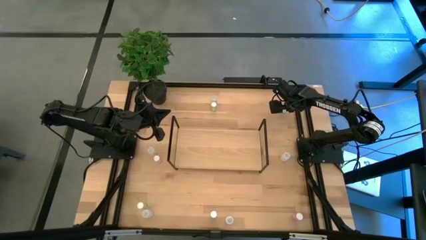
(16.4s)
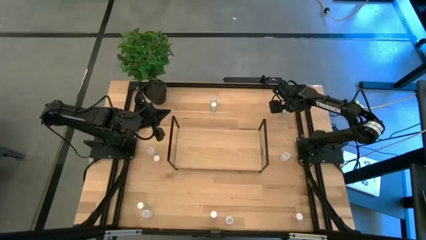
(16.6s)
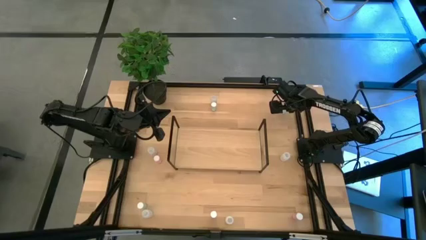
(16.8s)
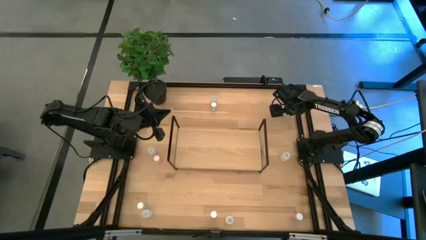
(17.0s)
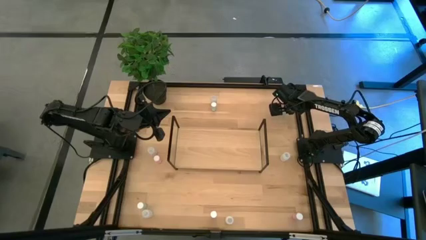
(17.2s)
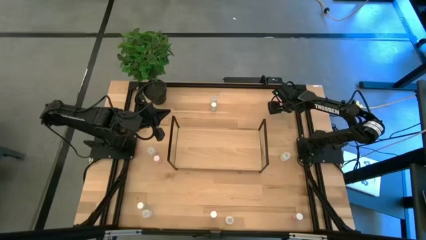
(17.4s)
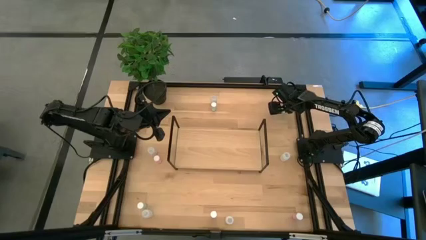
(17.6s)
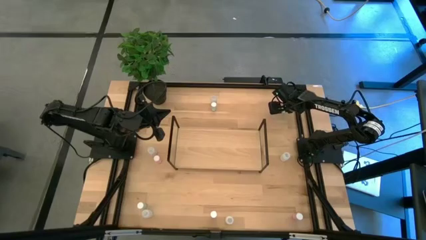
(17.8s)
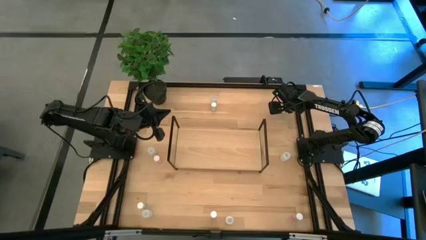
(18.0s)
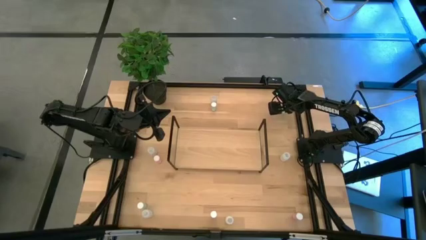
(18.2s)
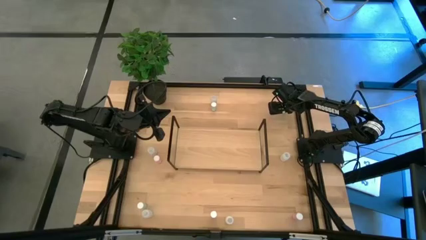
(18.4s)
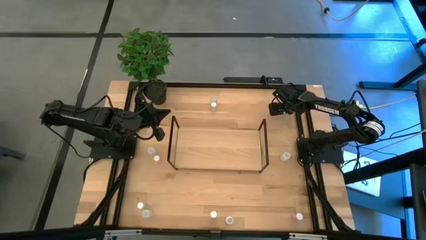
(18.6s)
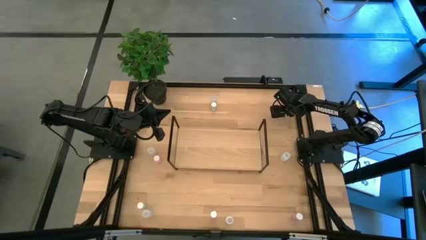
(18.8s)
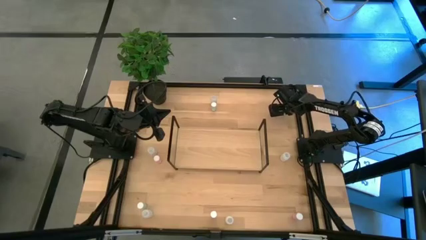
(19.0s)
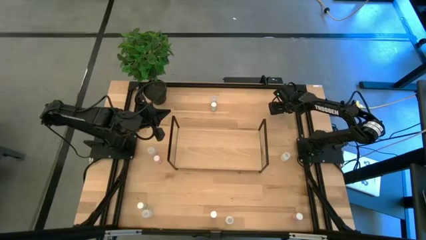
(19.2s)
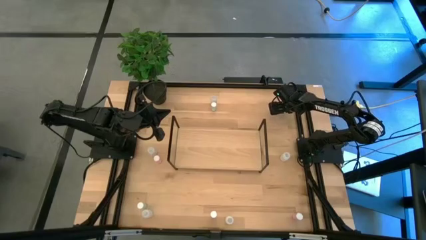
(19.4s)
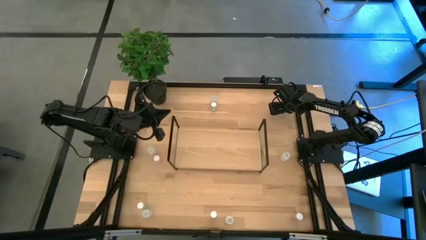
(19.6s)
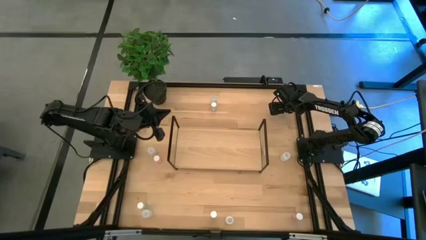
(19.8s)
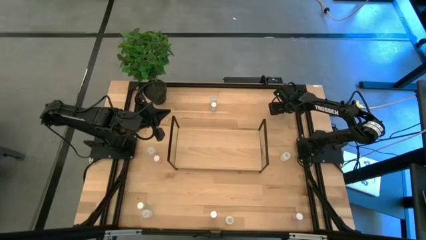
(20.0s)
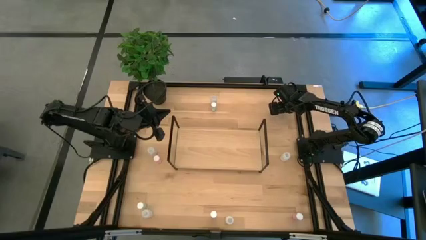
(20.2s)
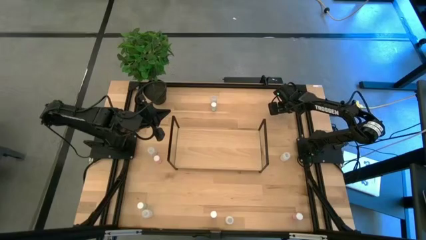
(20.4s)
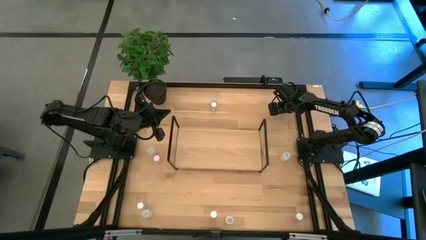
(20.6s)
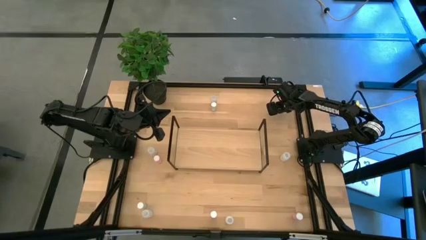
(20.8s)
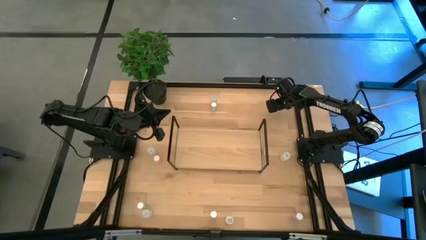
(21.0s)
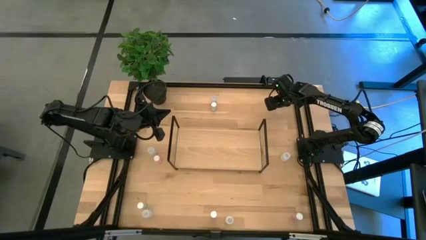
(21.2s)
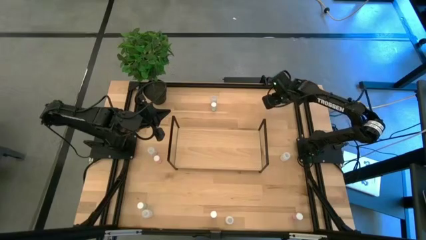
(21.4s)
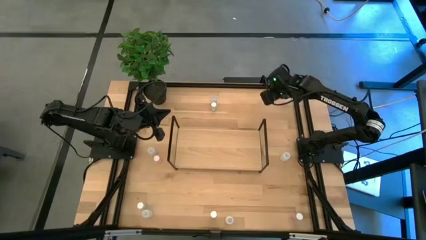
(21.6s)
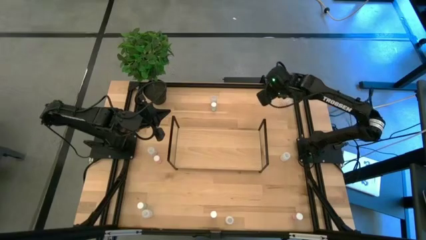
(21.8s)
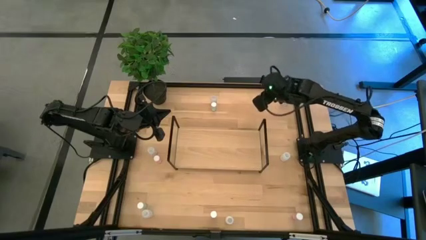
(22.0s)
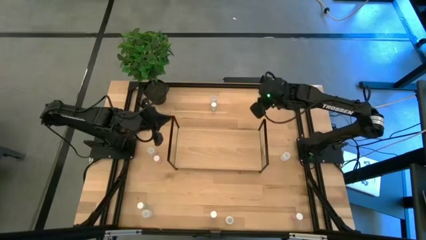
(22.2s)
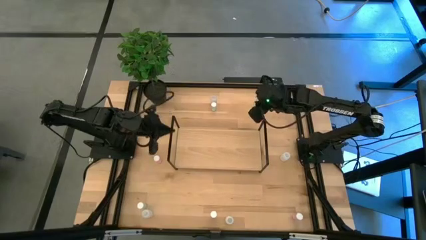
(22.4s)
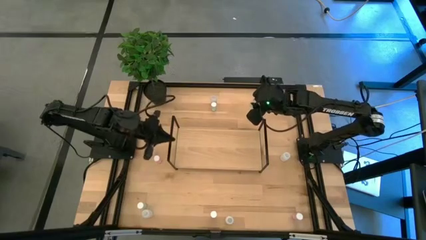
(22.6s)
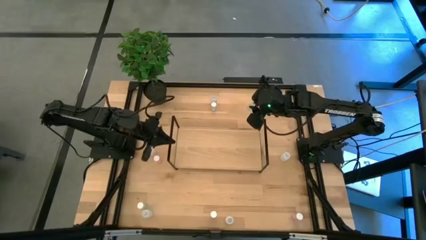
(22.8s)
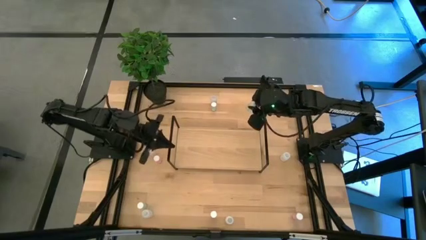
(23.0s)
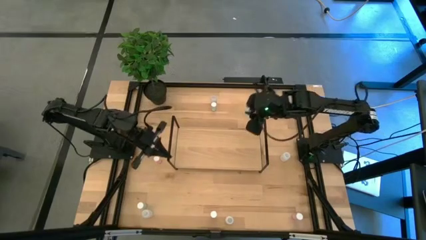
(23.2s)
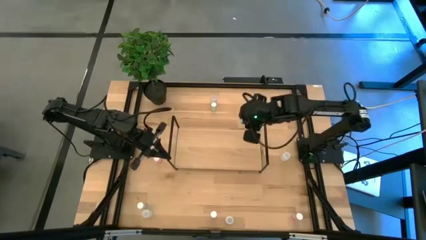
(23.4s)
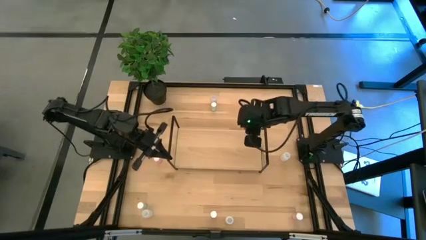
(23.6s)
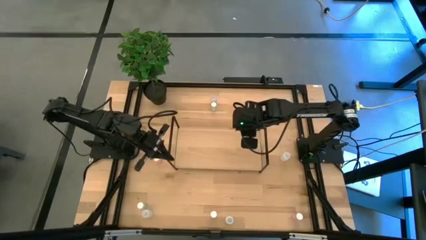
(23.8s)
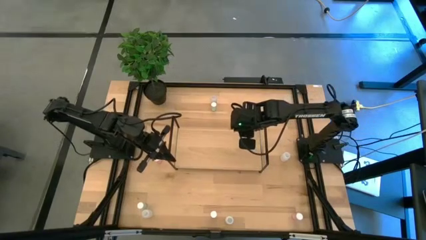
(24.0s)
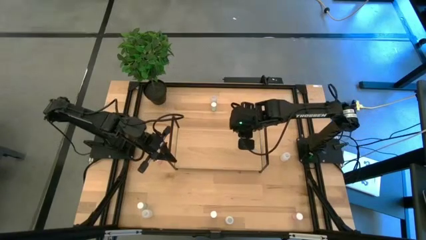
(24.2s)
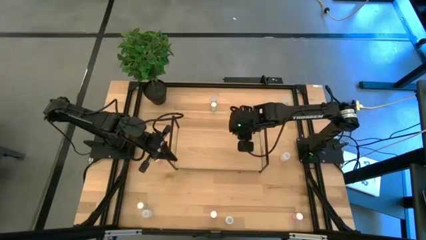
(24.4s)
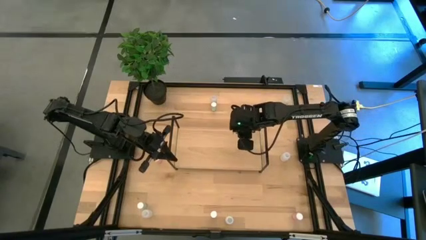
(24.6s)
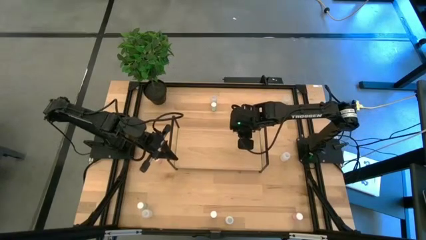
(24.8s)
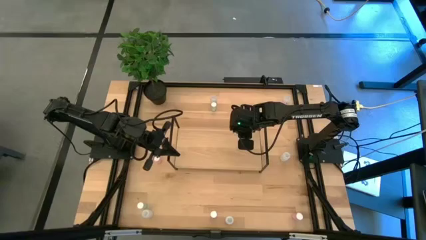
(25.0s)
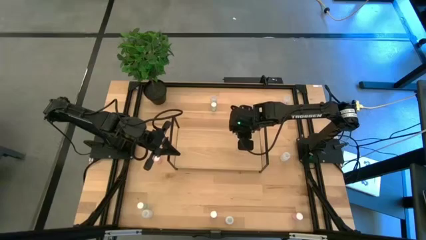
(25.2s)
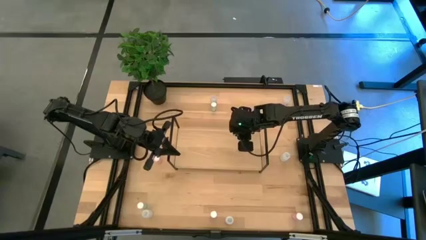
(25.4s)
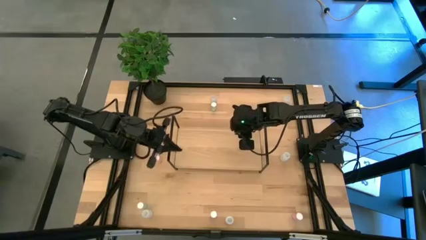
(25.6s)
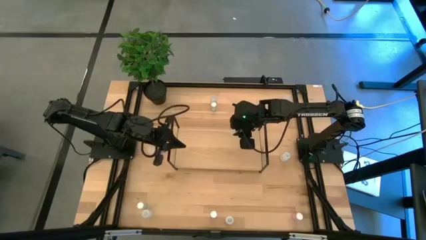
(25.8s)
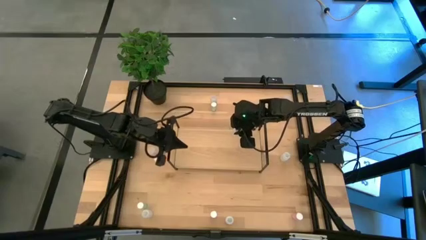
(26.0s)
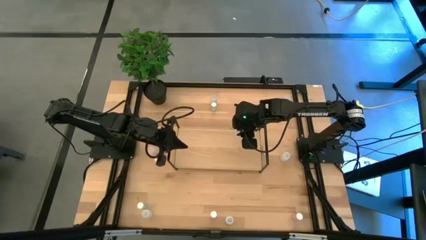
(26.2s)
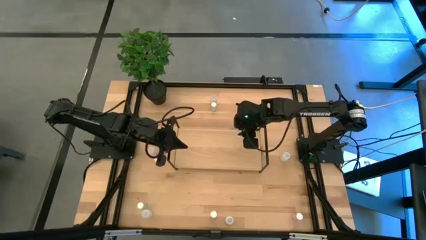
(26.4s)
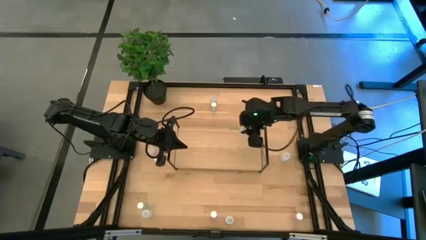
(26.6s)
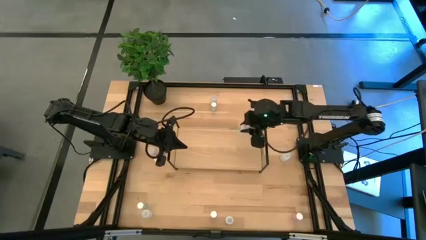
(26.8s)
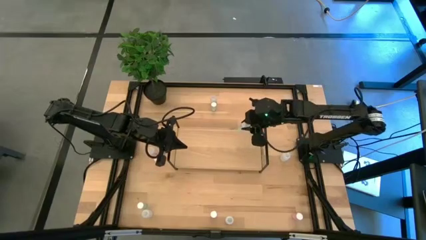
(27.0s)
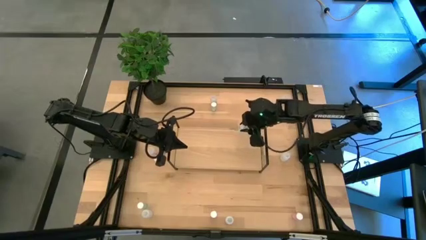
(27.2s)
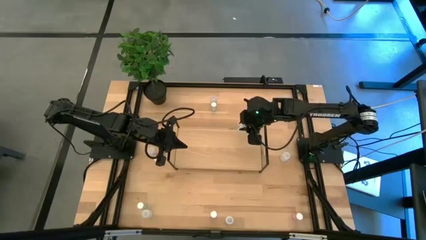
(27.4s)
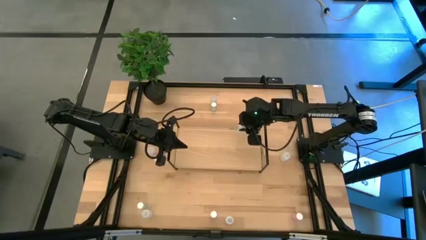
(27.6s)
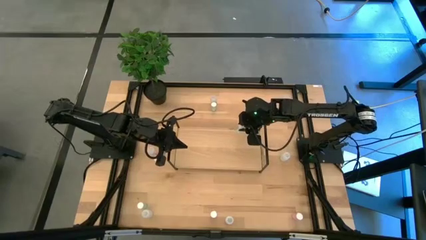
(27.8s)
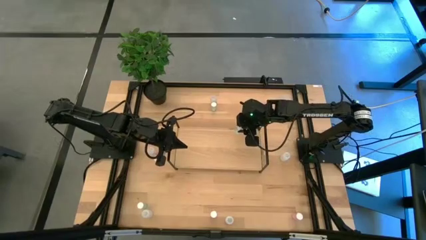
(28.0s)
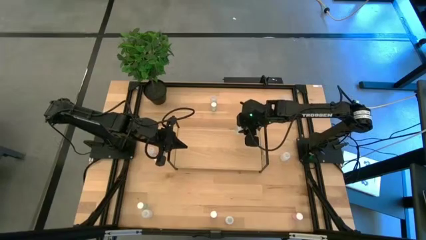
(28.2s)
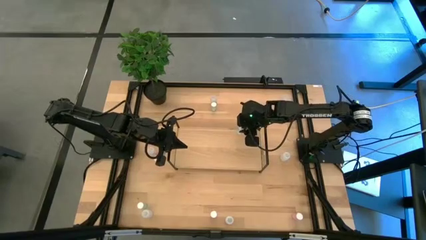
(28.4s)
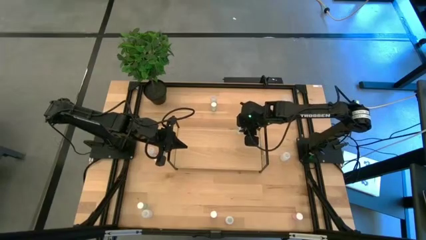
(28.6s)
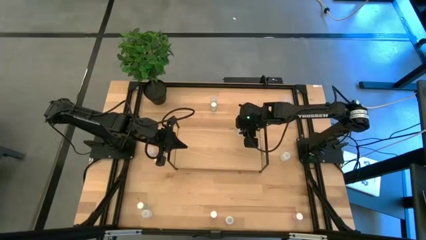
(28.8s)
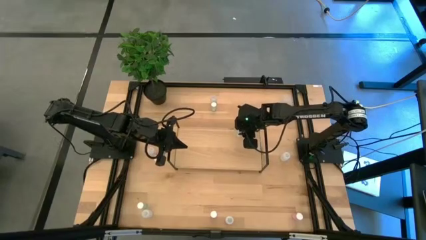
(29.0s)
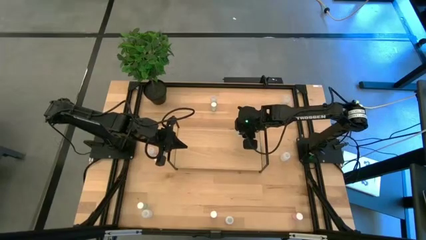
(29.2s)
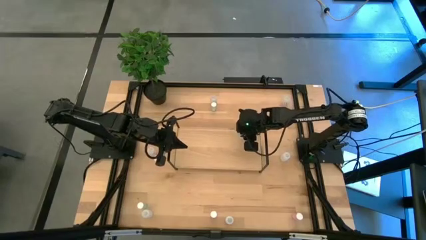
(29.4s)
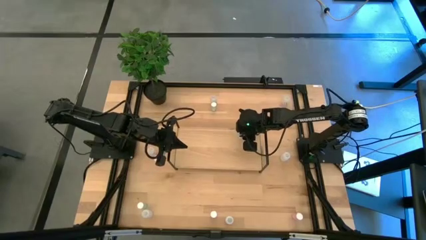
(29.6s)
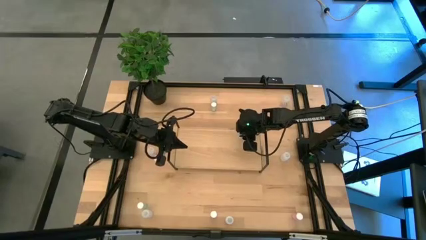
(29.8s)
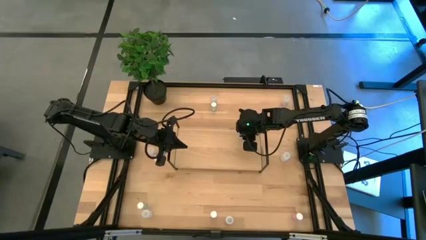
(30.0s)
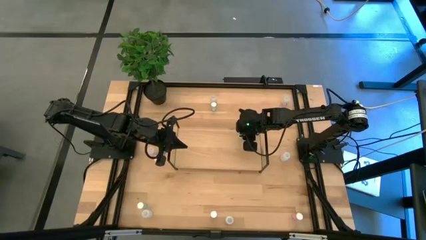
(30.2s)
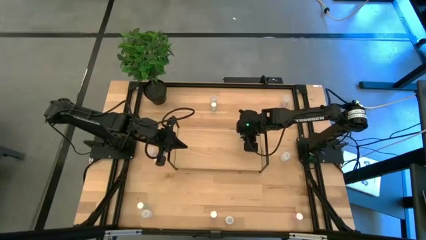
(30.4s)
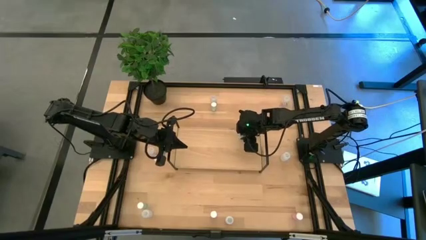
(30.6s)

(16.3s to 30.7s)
Task: Pick and place medicine bottles onto shelf by color
Put the top right blue pill bottle on the shelf
